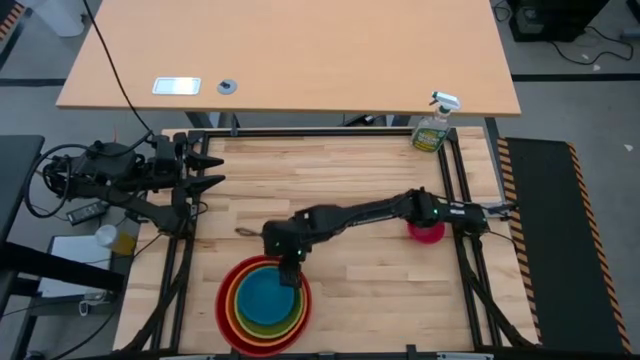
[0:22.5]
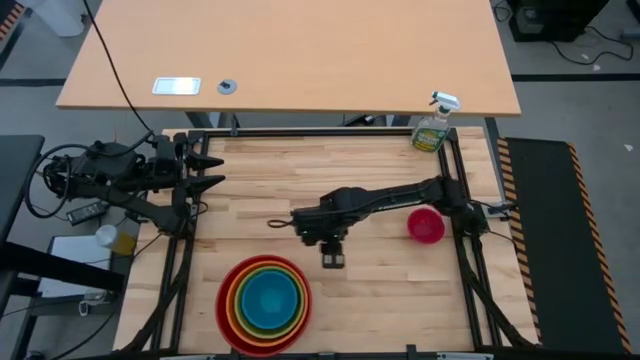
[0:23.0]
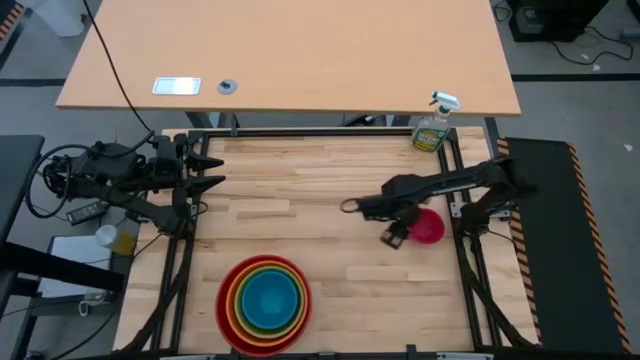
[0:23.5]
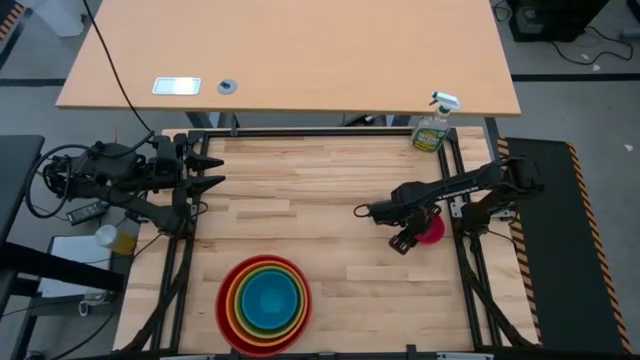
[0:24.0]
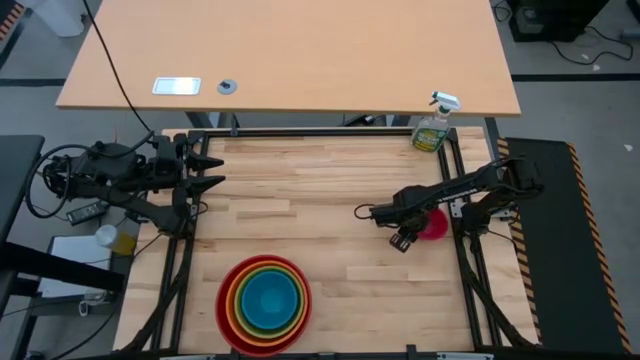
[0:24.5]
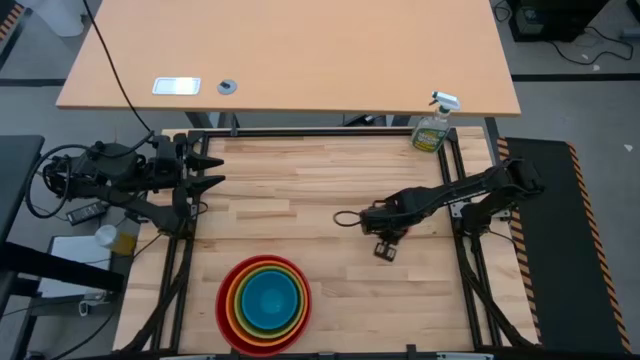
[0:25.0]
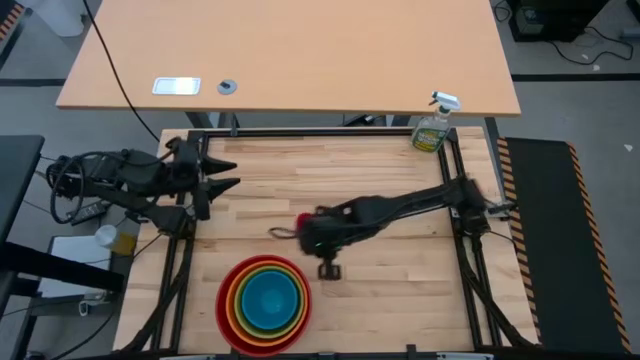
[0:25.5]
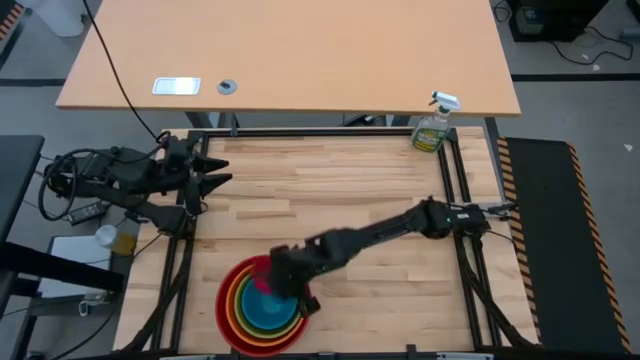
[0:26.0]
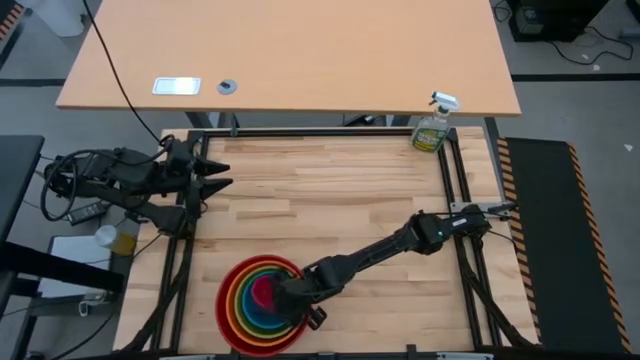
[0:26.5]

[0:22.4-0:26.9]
Stack the pink bowl on the blue bowl

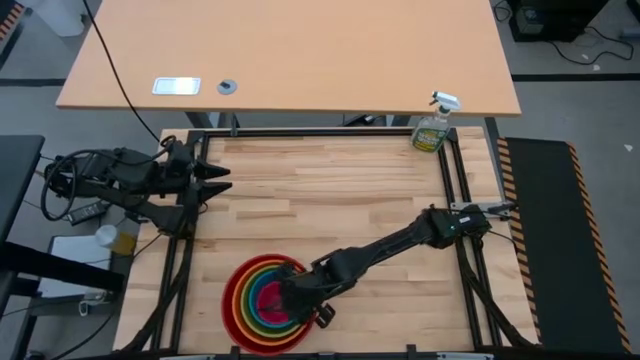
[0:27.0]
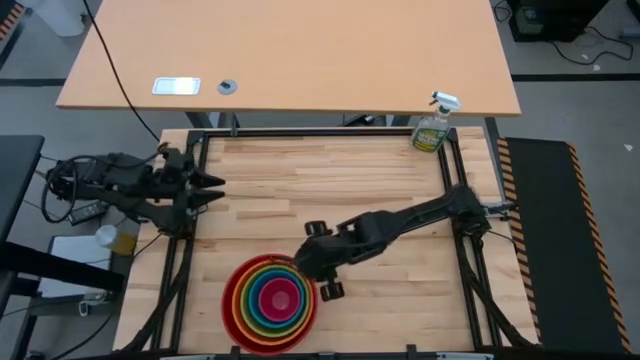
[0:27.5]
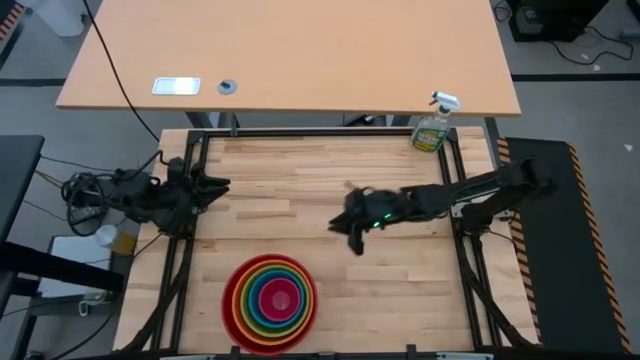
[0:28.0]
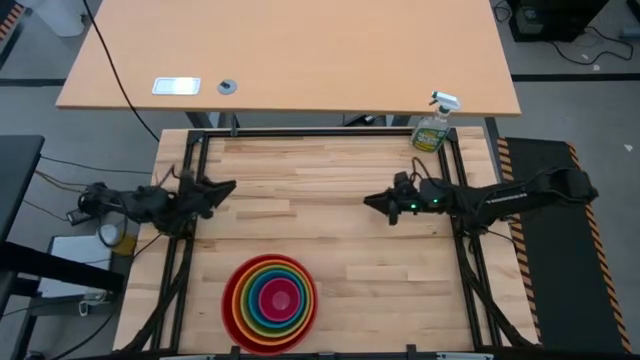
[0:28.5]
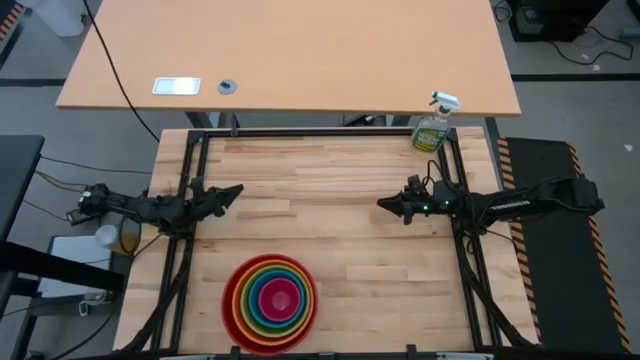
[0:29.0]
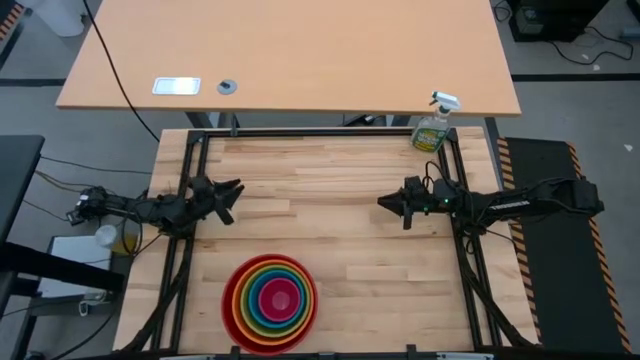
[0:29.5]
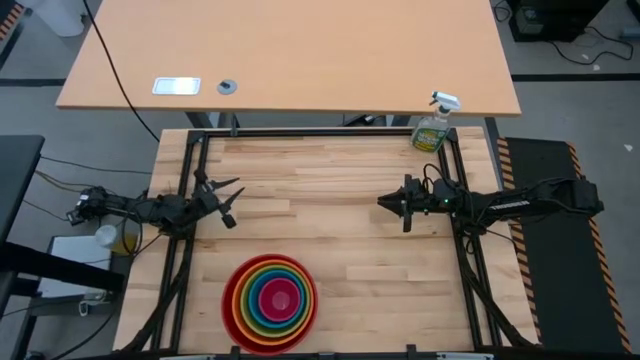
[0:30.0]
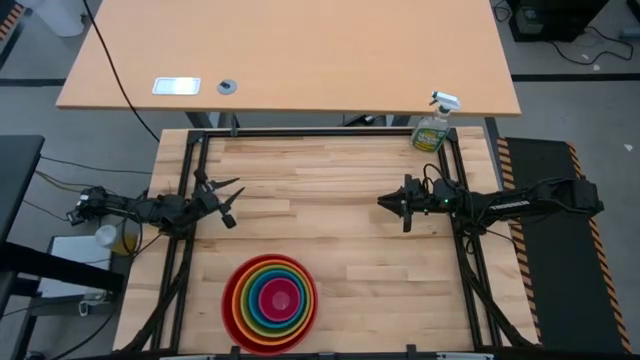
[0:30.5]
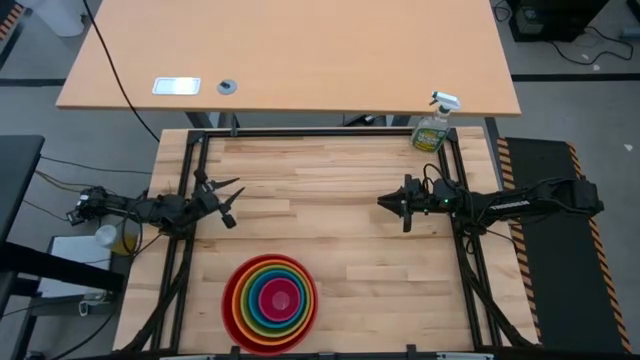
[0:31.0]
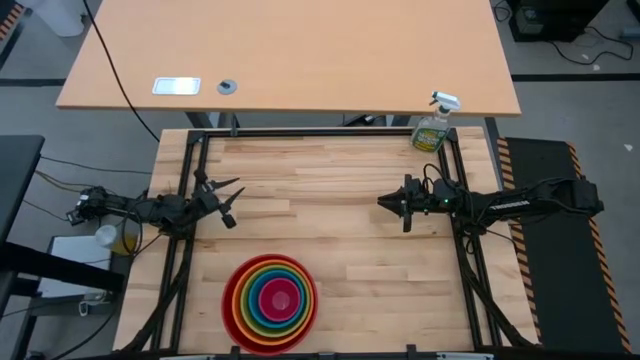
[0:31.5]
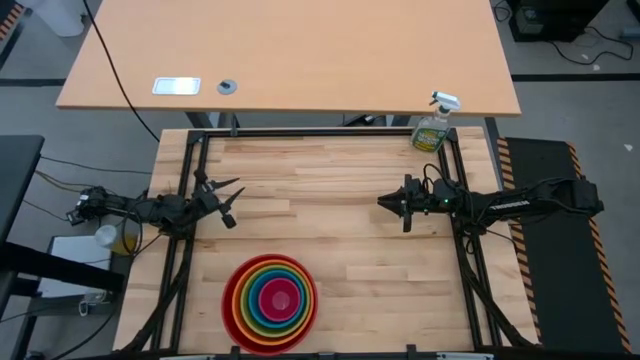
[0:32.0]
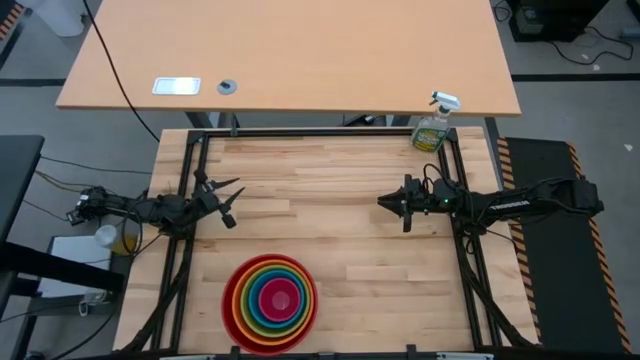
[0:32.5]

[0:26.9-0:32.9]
Return to Home Position

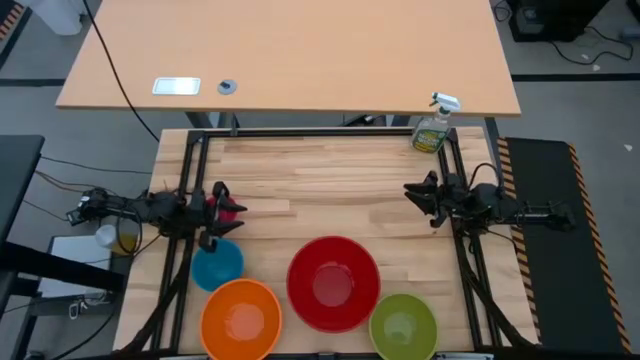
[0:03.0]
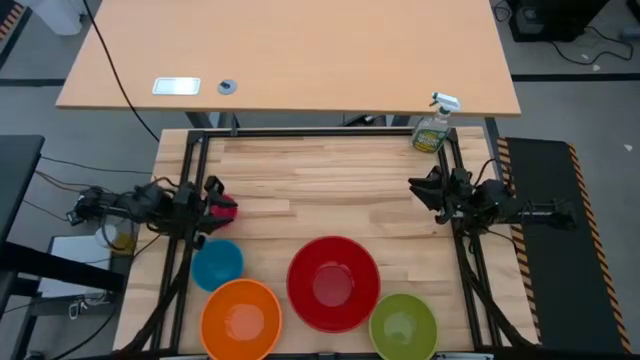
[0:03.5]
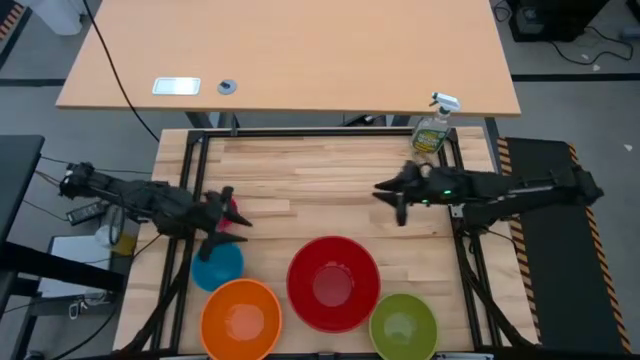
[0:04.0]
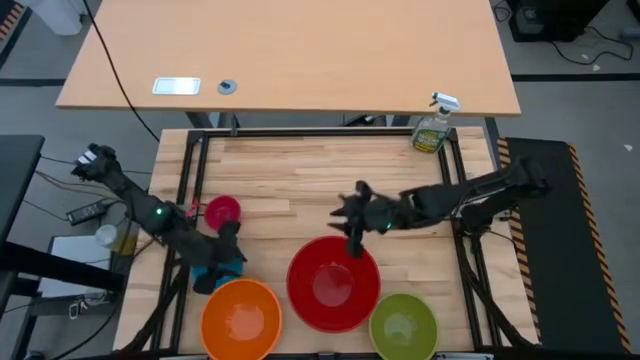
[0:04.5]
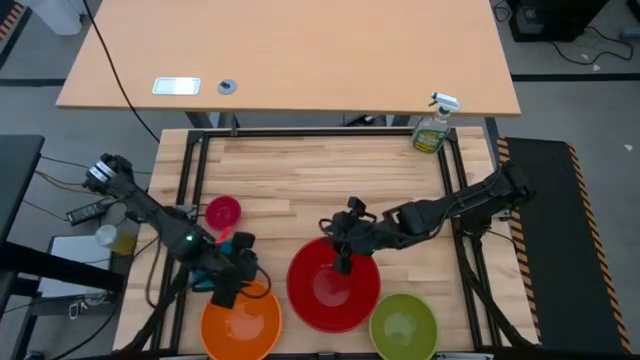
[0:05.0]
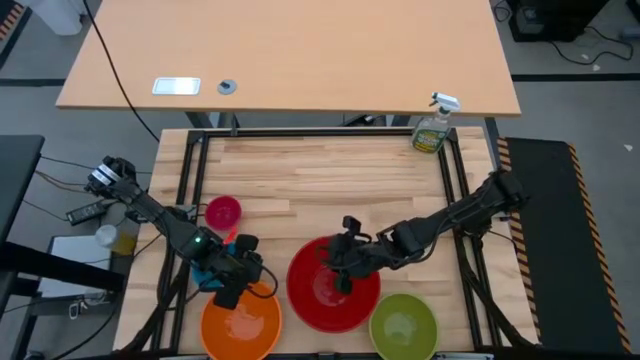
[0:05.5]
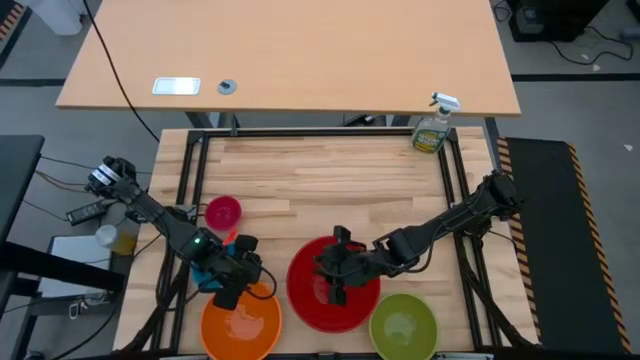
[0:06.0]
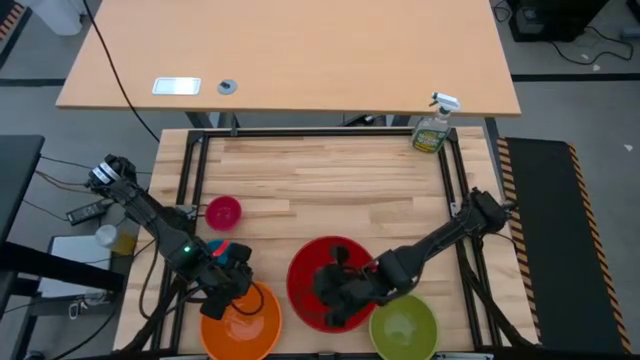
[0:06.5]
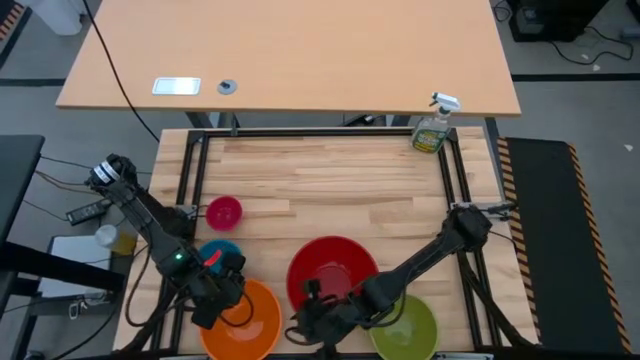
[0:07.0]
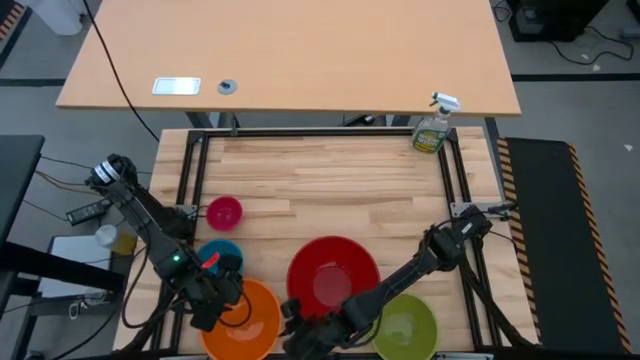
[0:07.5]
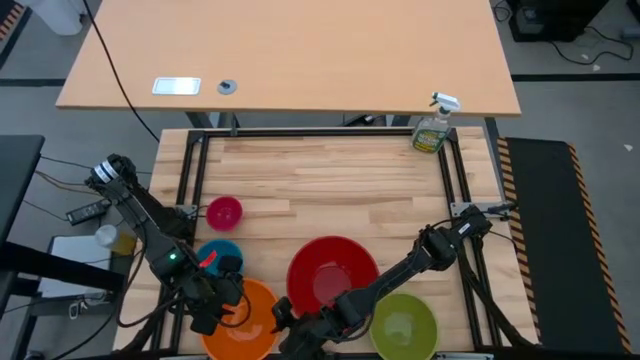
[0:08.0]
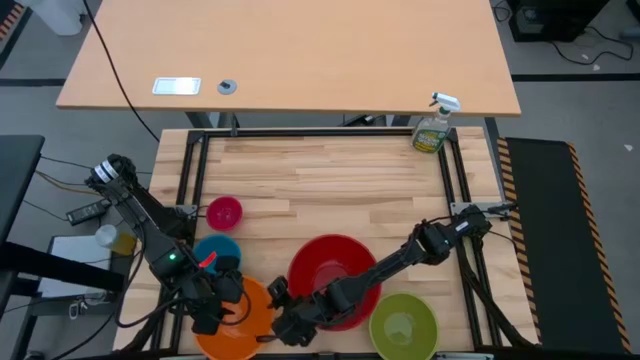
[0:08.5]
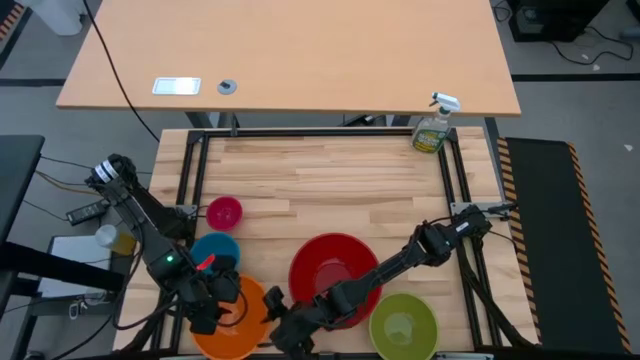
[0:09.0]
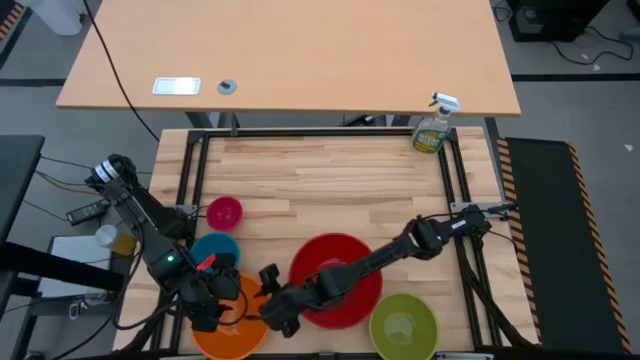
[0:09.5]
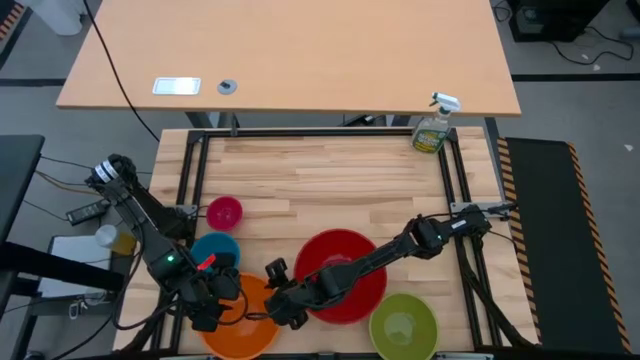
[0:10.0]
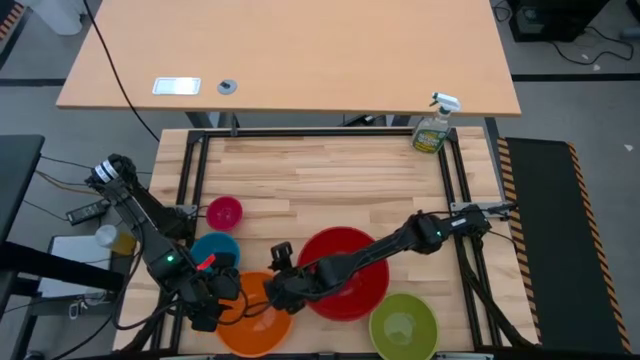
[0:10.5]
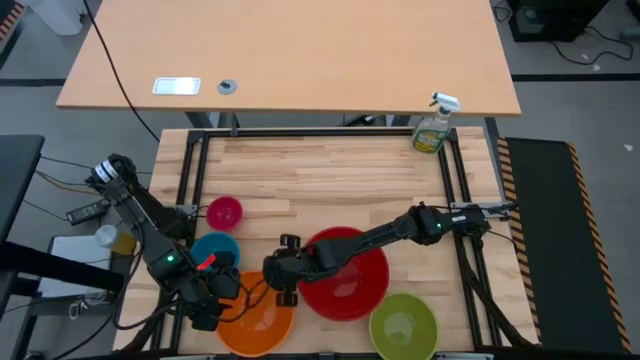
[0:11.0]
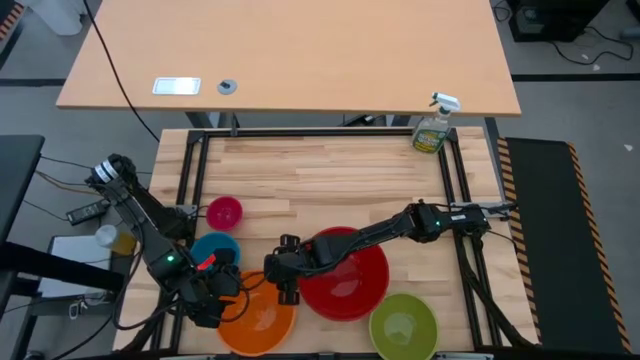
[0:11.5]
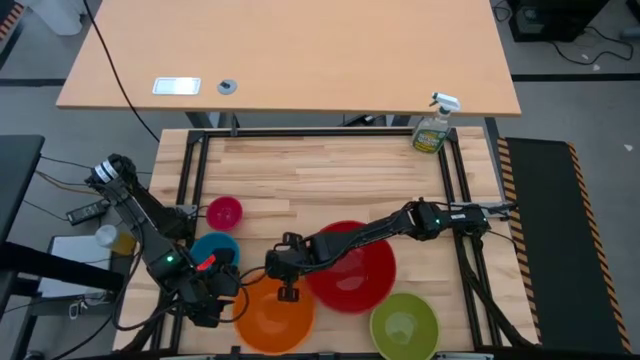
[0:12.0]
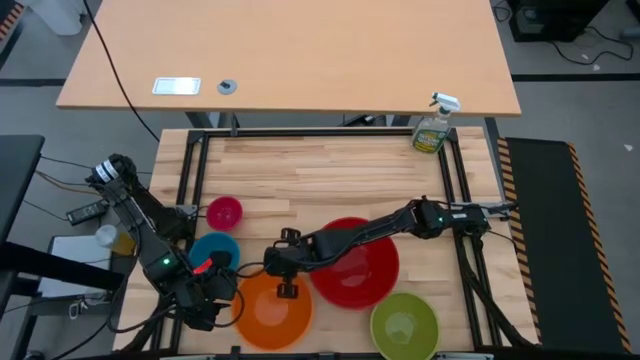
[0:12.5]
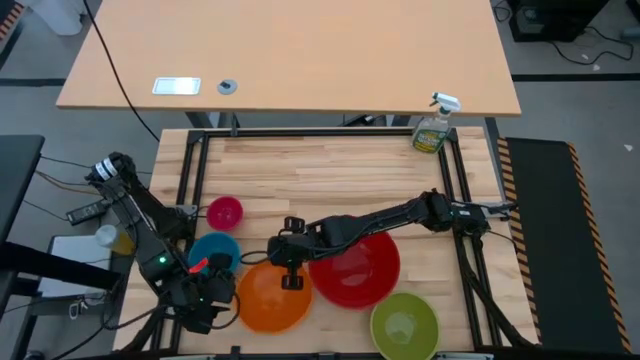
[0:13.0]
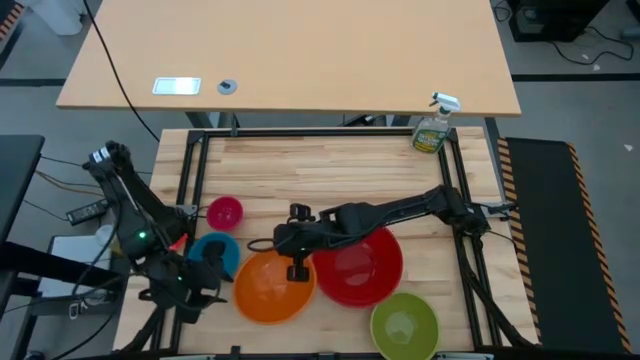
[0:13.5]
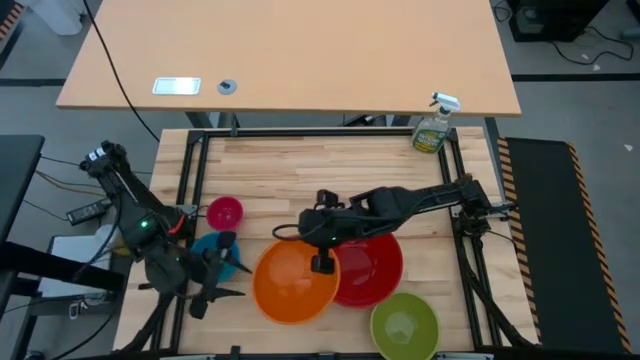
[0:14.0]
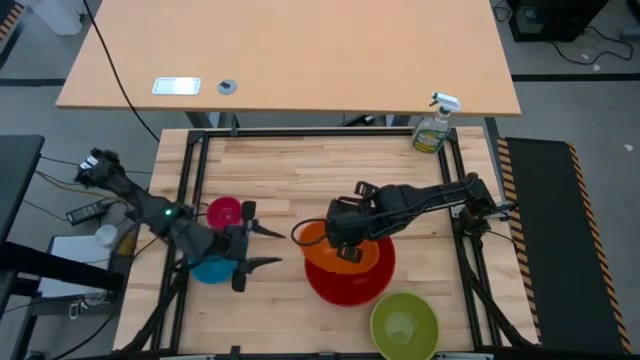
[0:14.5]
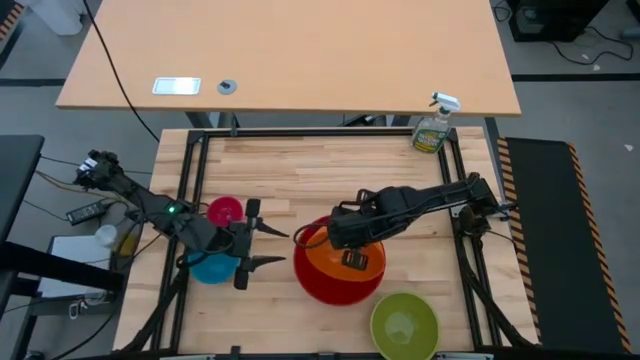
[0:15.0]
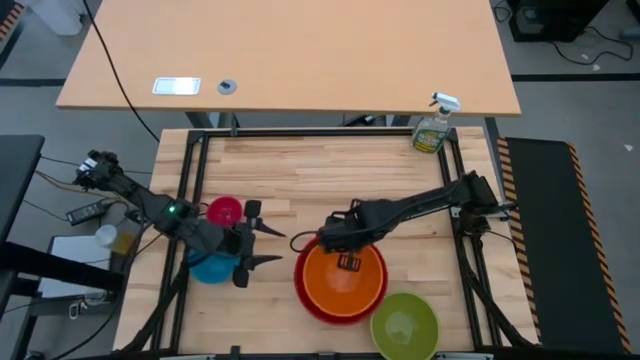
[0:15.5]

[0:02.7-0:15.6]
Stack the orange bowl on the red bowl
